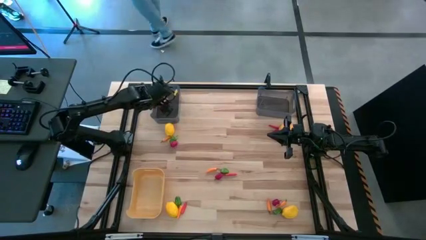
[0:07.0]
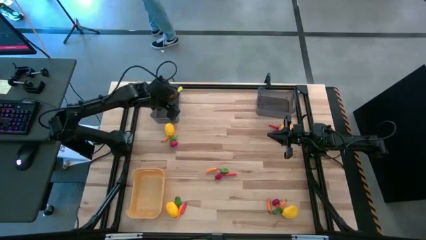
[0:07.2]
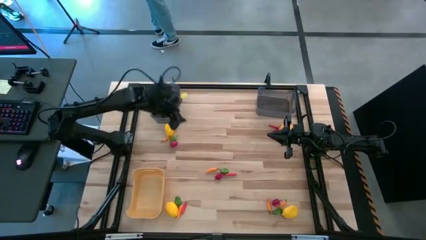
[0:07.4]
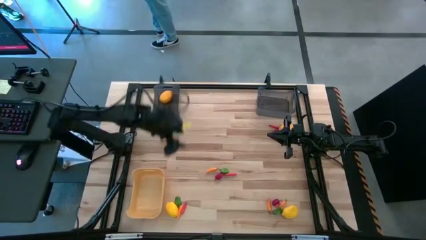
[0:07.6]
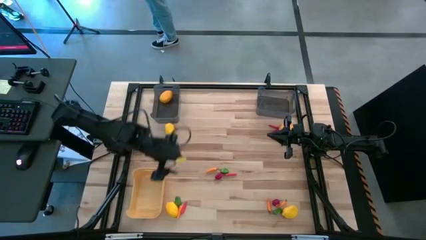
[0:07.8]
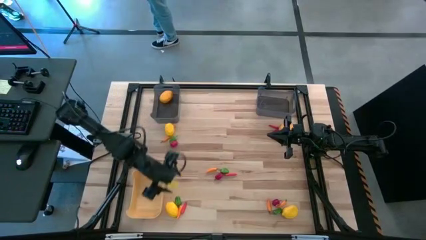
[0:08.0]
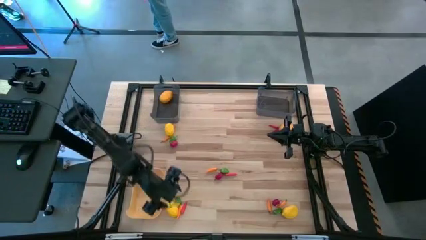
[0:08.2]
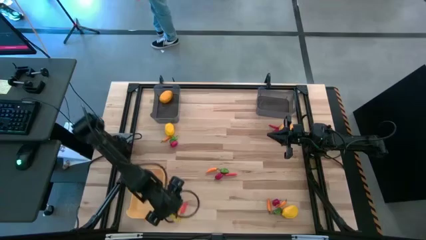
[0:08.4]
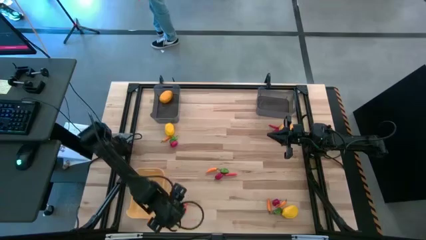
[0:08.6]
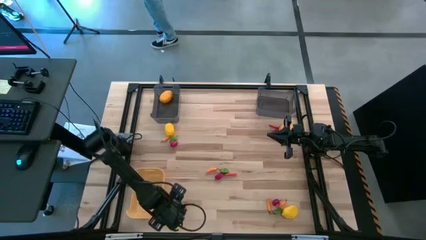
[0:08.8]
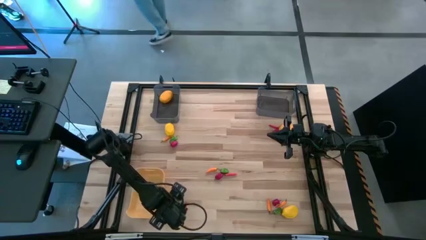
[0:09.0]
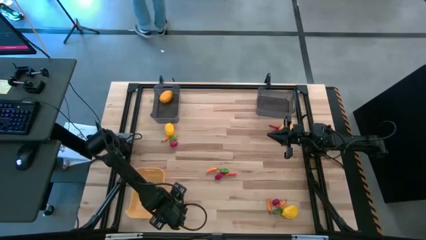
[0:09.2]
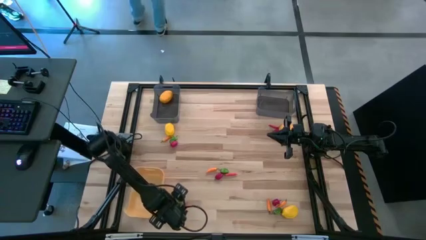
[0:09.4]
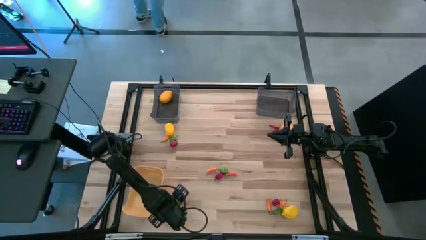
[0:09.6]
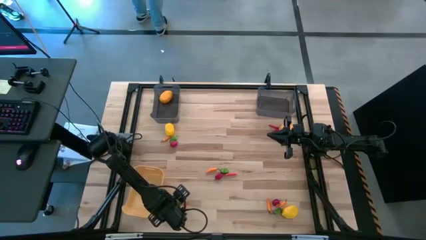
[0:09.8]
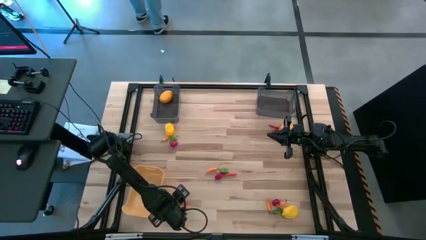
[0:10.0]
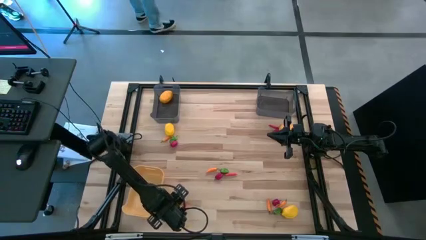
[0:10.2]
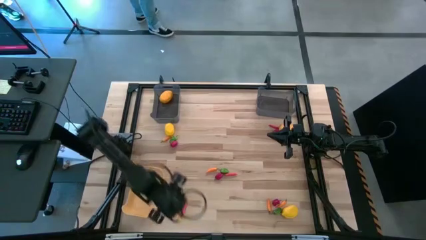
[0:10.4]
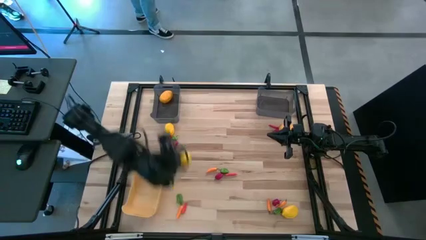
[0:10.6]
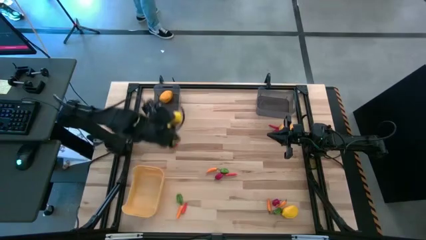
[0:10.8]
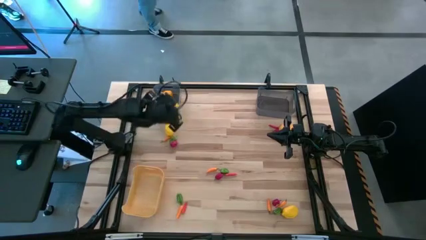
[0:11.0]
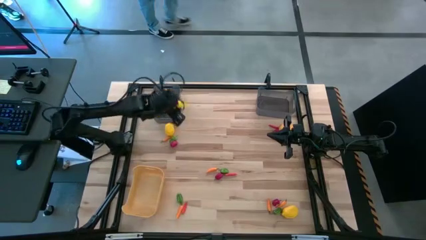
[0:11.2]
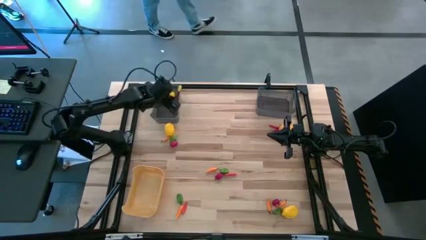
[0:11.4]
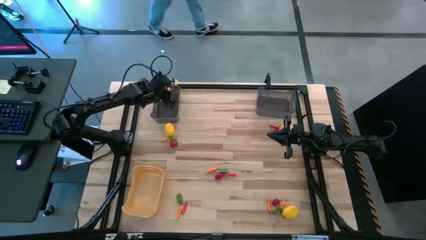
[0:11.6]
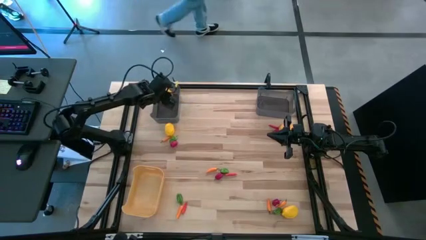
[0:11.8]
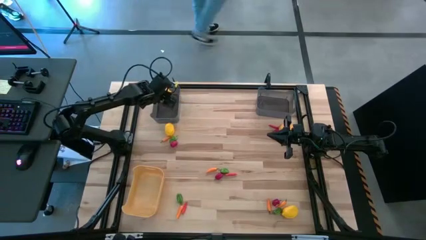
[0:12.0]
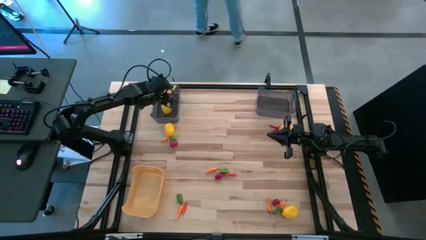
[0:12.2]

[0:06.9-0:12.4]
Task: Sort produce into baskets
Put the bottom left yellow lemon into the left black bin

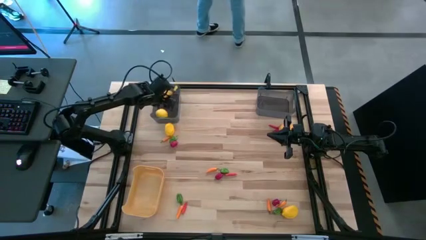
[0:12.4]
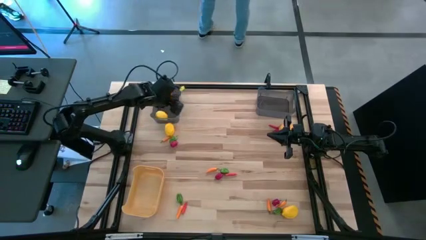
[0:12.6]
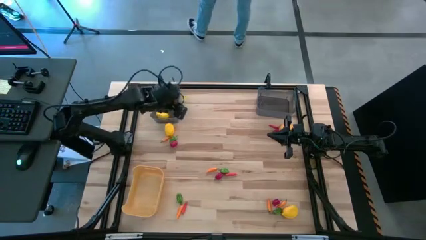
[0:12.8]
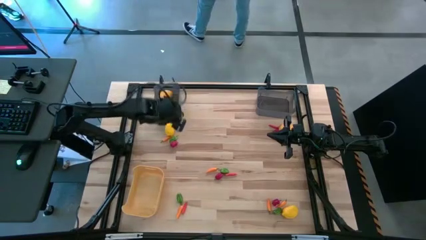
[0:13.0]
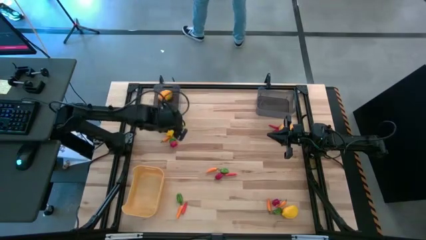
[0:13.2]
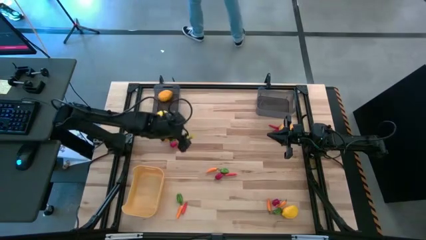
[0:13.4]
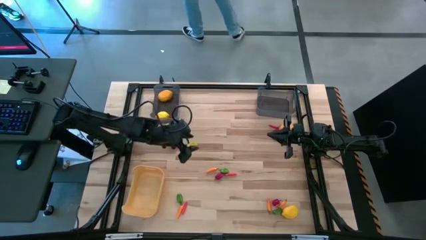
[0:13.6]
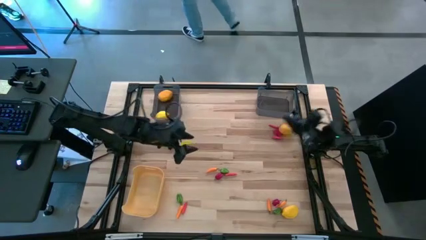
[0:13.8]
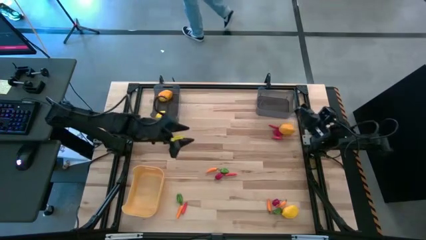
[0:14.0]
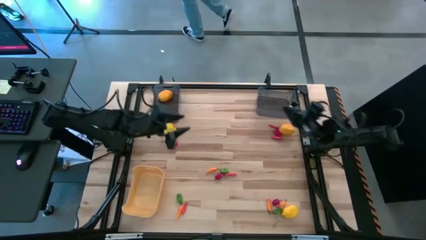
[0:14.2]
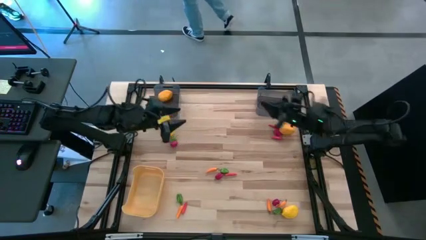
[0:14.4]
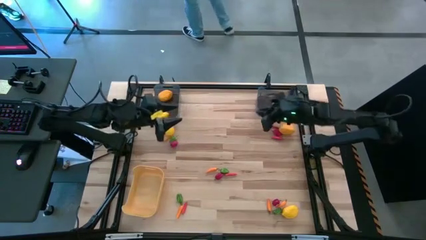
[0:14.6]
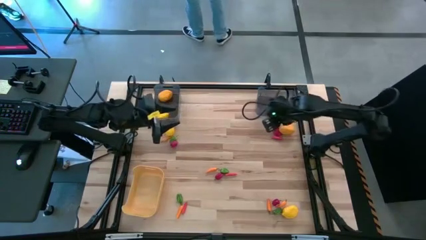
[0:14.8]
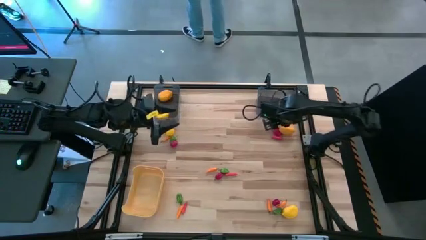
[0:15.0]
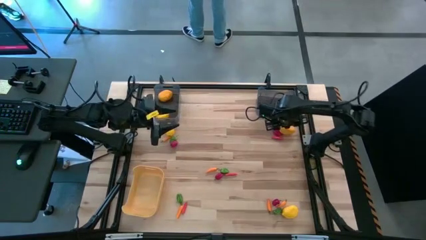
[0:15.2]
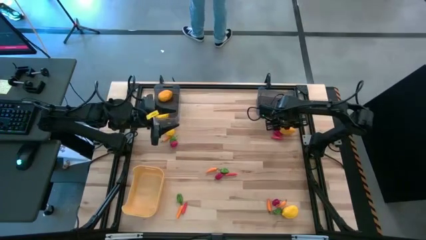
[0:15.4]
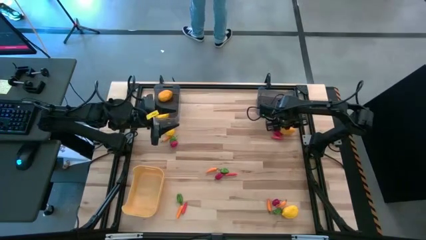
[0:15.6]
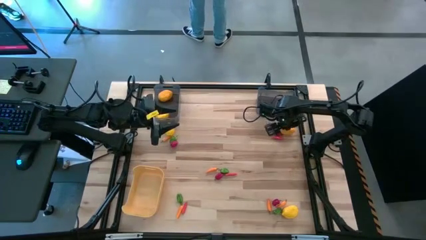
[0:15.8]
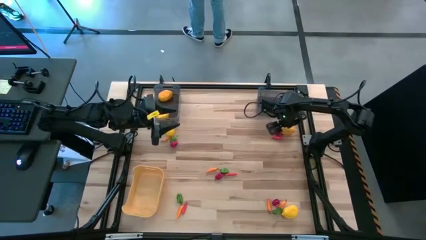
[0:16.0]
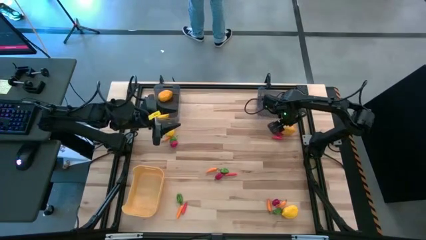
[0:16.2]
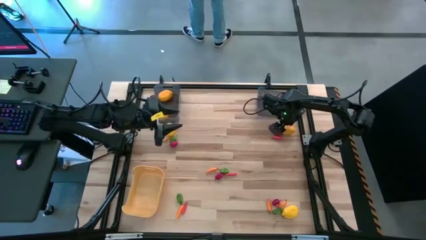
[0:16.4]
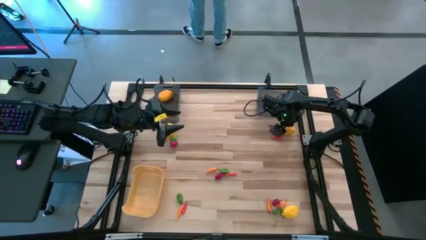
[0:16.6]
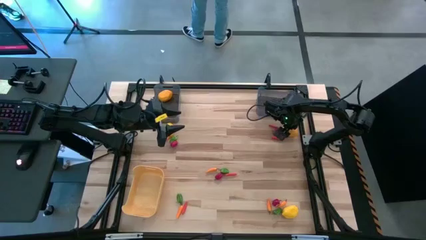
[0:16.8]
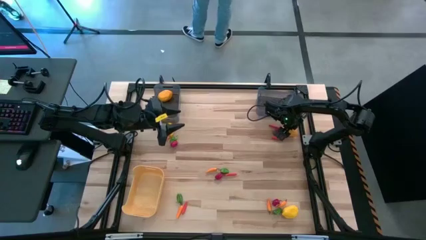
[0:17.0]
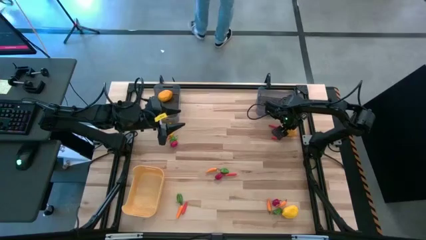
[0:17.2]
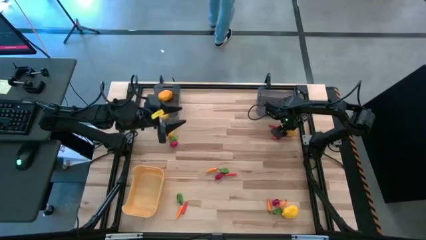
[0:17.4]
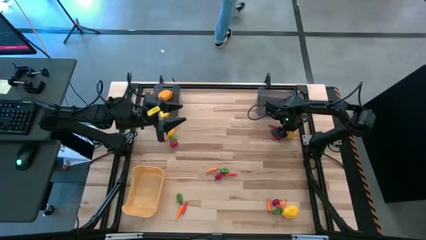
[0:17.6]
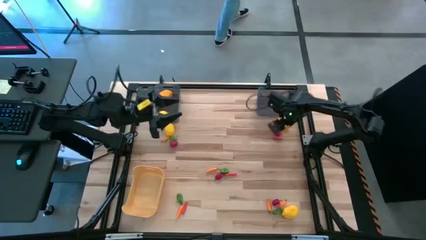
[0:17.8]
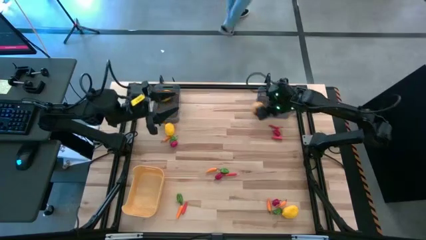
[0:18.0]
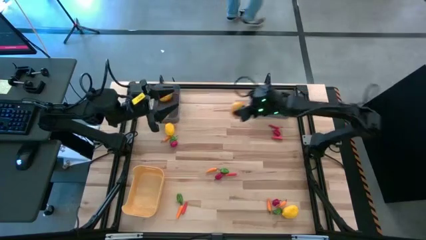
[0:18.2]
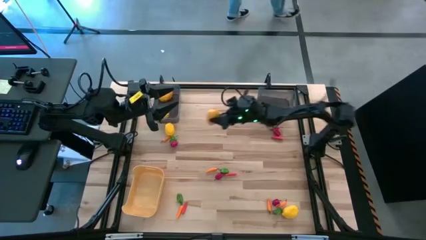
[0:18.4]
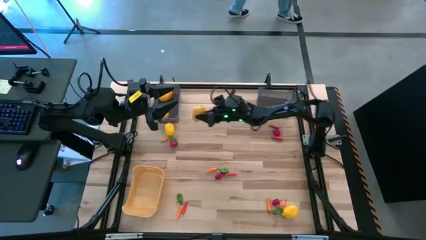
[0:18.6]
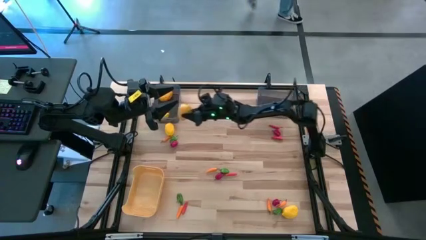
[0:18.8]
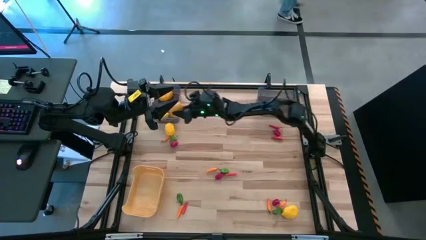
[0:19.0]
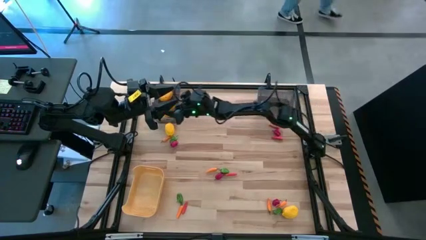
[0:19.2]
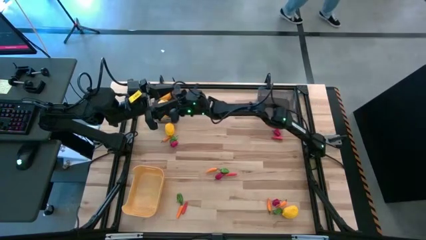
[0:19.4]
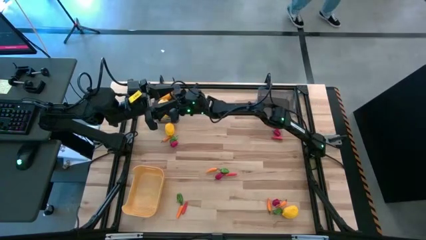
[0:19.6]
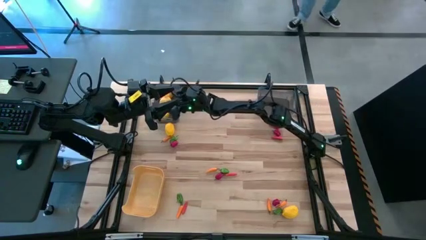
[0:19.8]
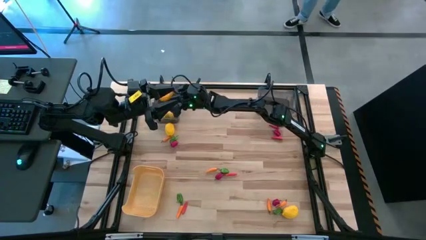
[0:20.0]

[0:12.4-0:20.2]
Put the top right yellow lemon into the left black bin

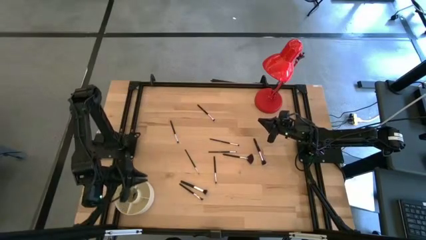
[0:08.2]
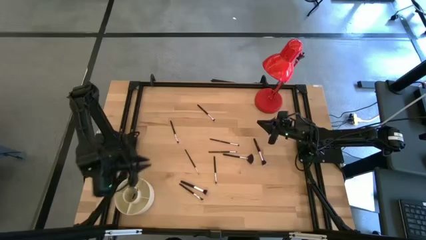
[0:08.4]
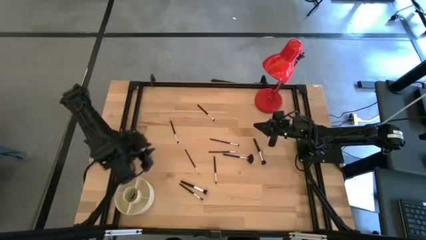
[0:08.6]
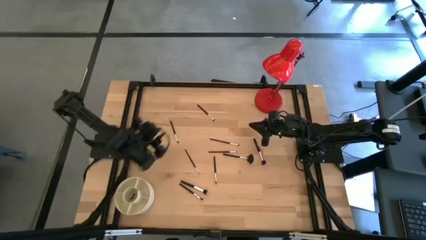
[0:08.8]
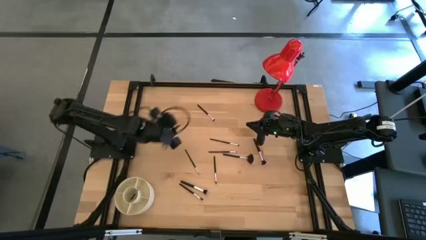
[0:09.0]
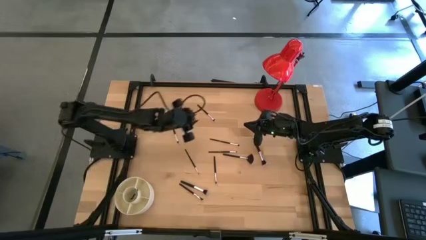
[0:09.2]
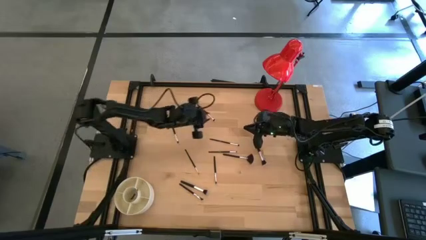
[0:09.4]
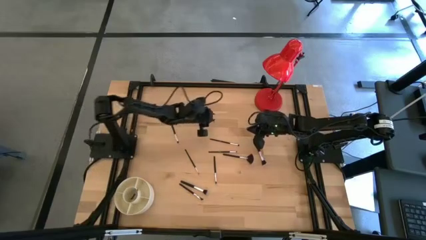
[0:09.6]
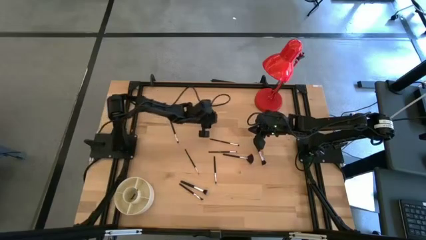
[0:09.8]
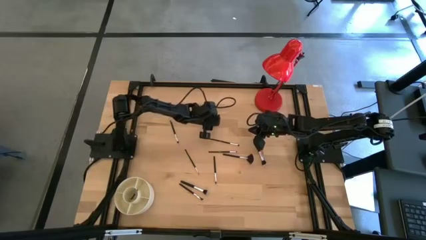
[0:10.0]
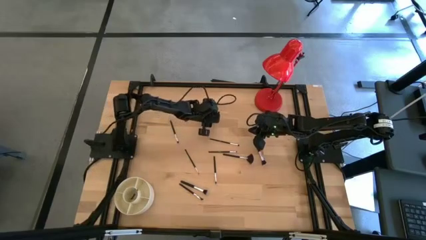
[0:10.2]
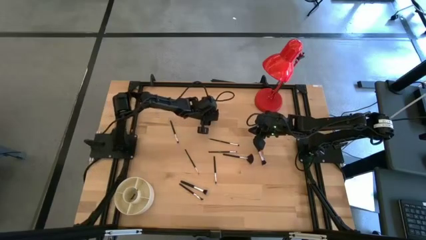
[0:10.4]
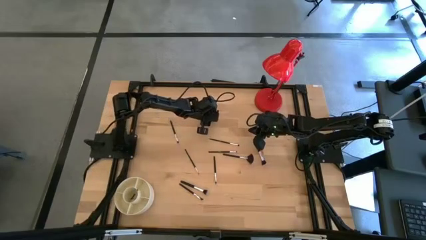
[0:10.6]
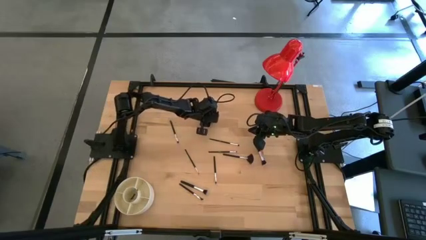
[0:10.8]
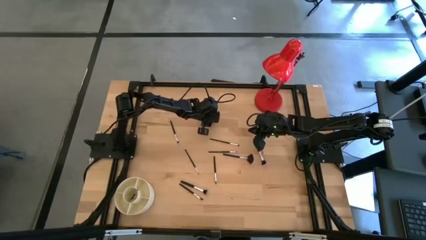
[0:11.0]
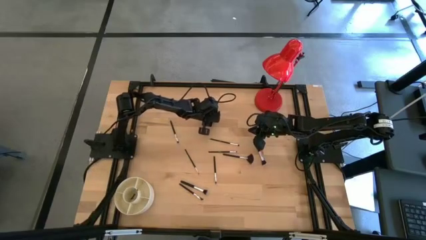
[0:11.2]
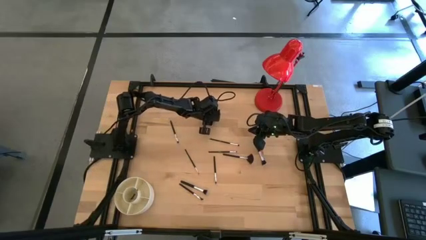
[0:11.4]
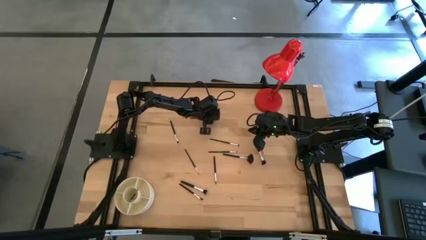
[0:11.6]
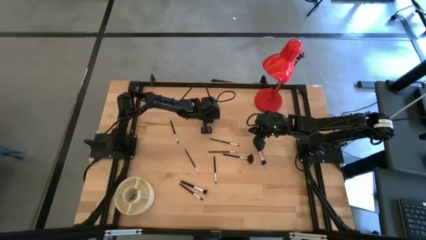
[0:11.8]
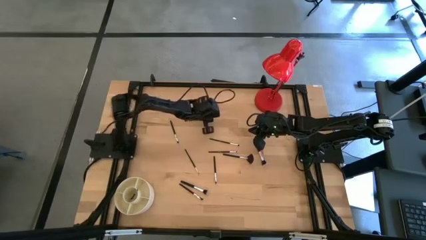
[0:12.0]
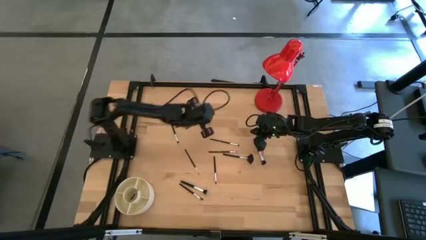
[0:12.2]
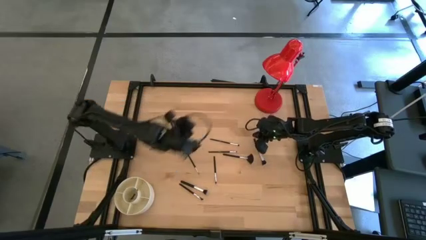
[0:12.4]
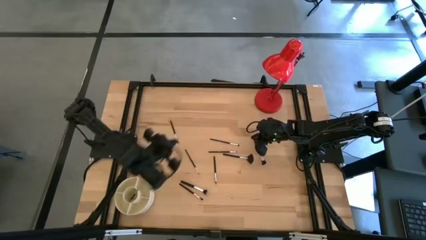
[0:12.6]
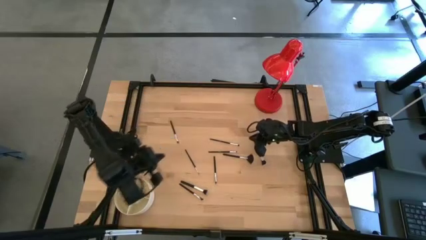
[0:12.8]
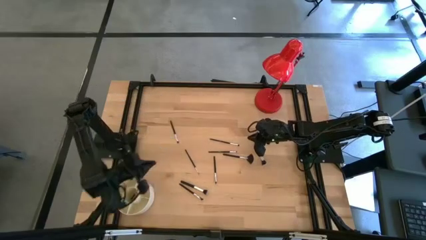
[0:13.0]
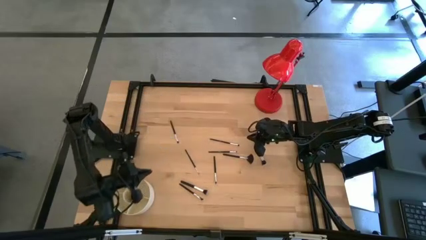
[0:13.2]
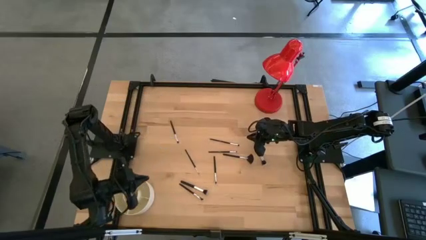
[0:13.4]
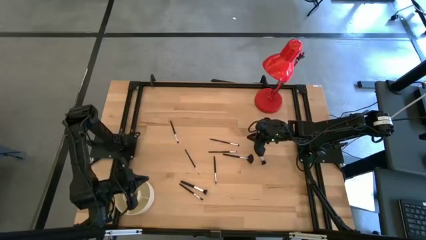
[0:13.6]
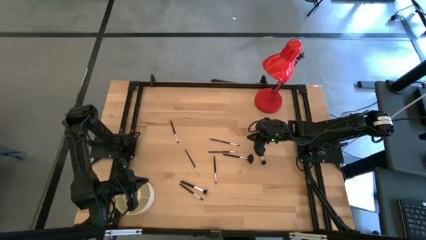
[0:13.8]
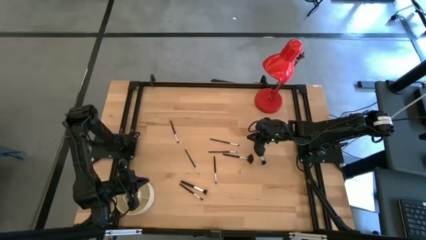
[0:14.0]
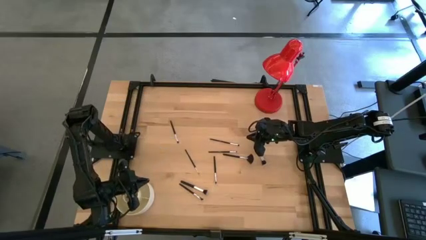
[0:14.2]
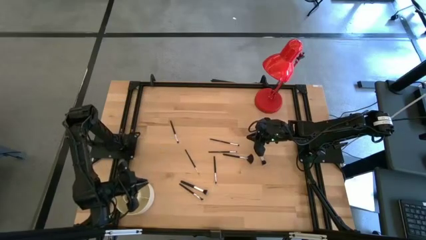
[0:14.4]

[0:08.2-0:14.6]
Task: Pick & Place Makeup Brushes
Put the black eyeshadow brush into the makeup organizer
